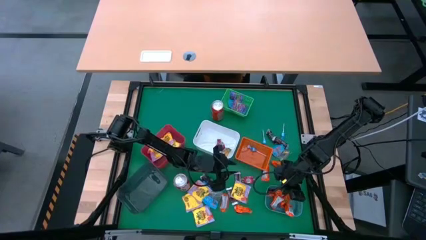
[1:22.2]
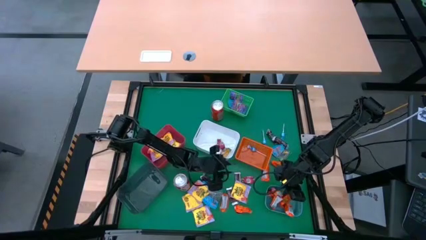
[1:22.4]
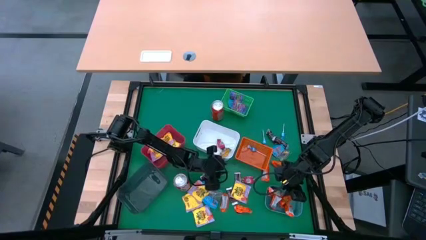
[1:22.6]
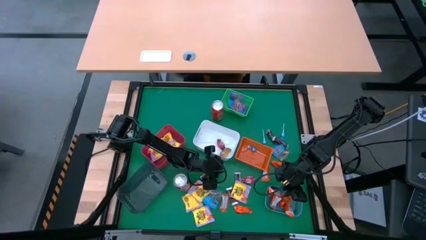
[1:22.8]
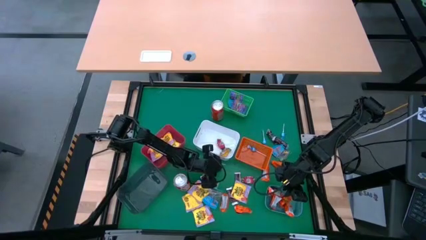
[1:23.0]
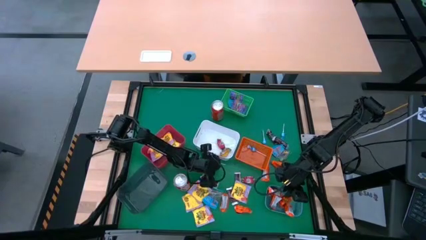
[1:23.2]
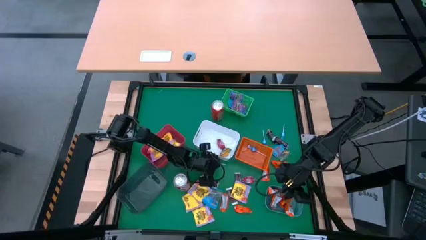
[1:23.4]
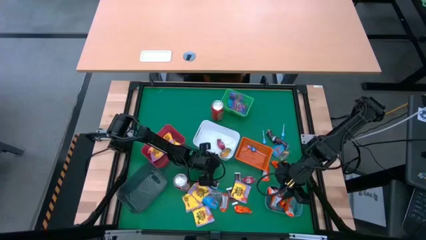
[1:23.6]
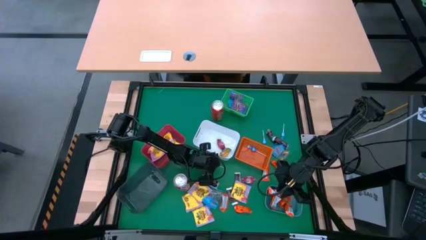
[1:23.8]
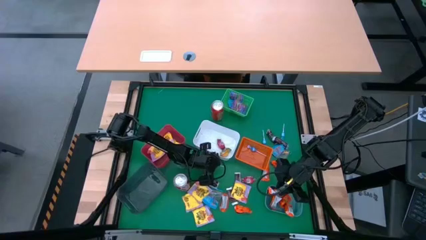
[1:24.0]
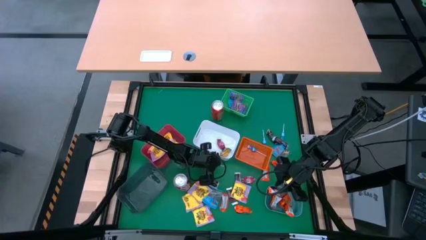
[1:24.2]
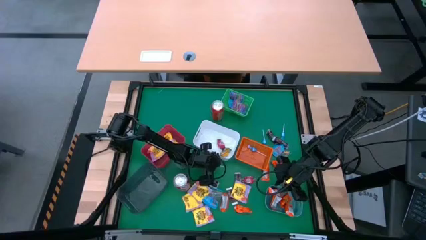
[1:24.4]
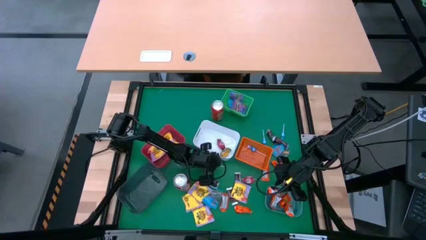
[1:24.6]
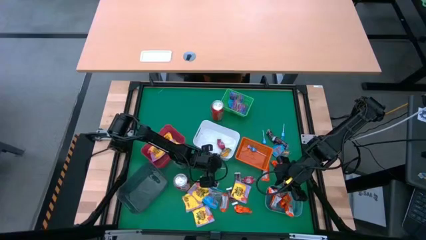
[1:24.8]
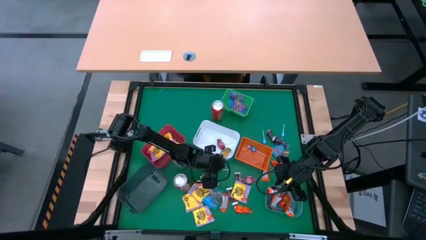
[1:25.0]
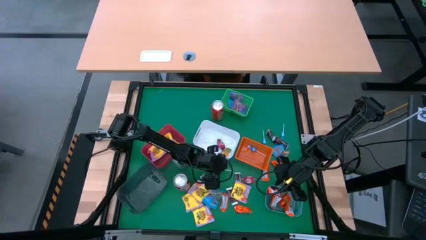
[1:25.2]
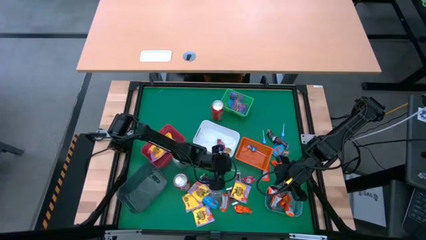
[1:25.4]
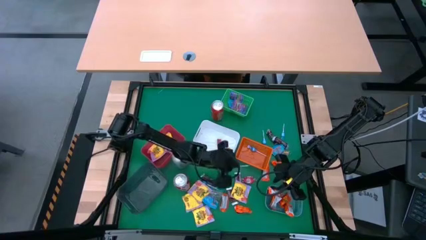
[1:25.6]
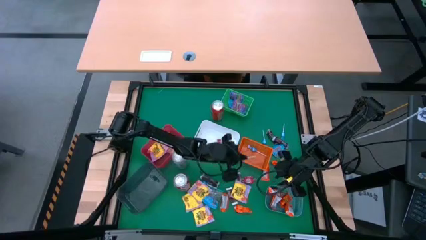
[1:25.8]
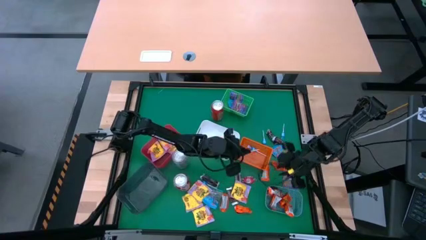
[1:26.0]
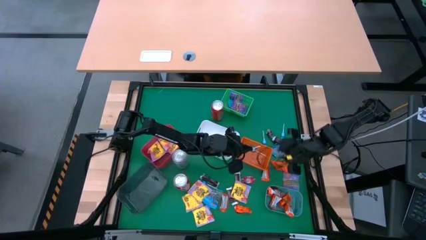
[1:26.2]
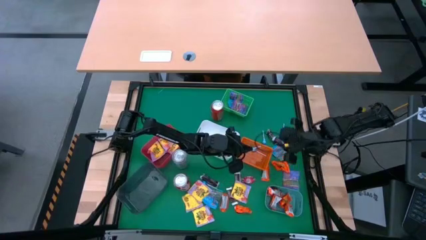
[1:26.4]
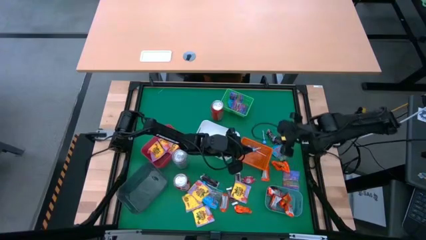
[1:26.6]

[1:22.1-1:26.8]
Task: Sort candy
Put the blue lollipop into the orange bin

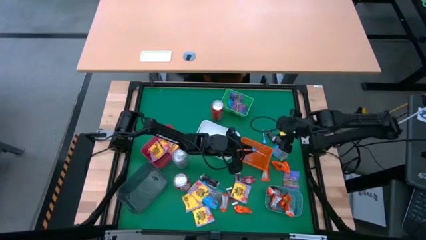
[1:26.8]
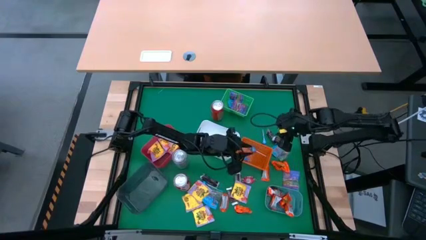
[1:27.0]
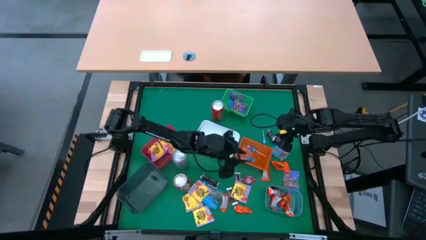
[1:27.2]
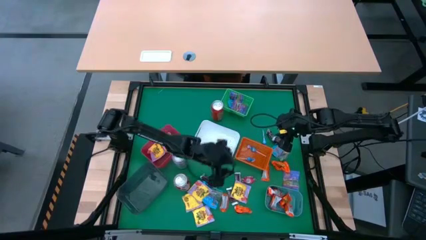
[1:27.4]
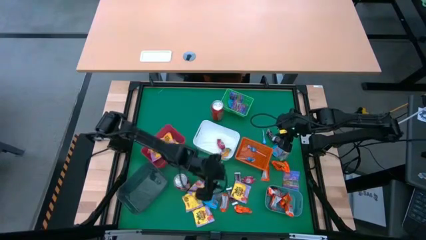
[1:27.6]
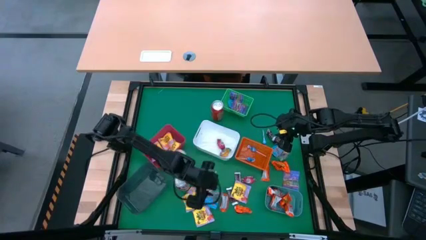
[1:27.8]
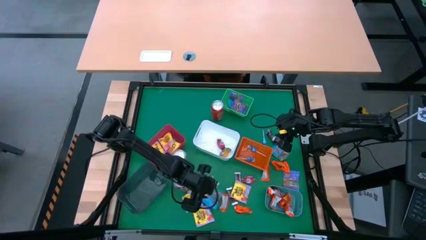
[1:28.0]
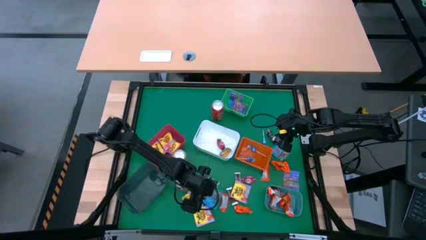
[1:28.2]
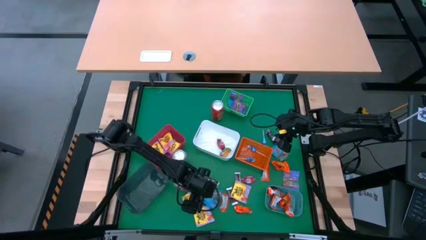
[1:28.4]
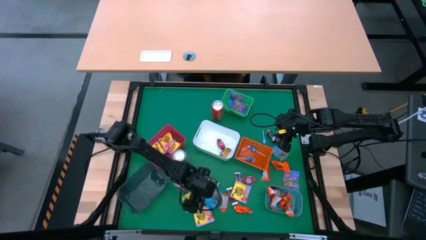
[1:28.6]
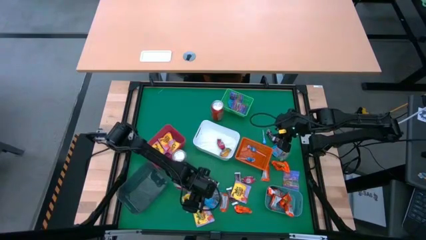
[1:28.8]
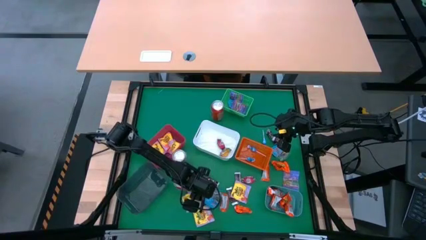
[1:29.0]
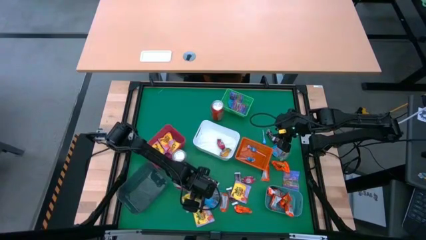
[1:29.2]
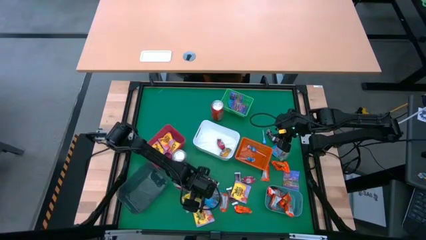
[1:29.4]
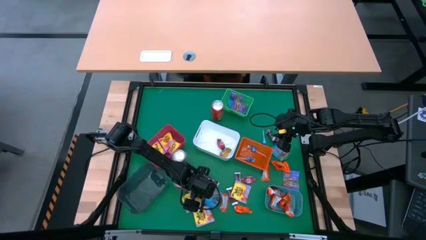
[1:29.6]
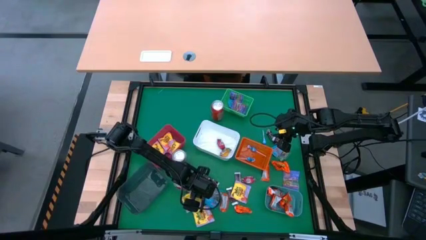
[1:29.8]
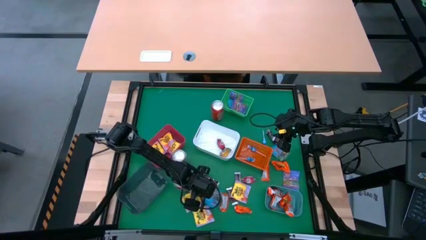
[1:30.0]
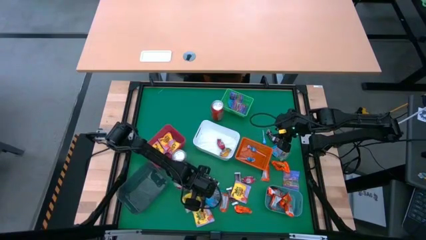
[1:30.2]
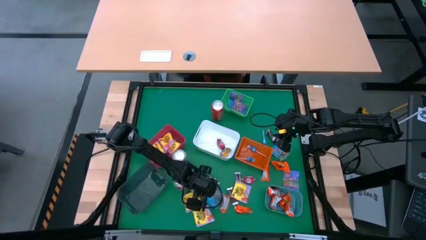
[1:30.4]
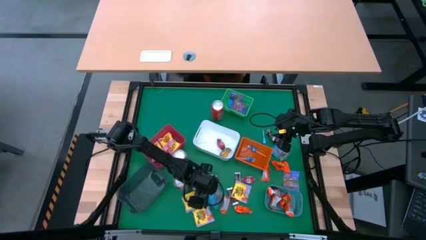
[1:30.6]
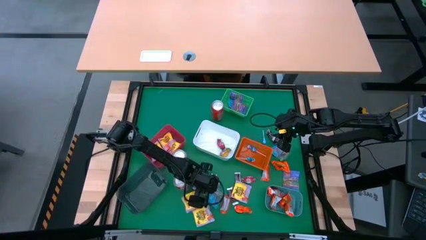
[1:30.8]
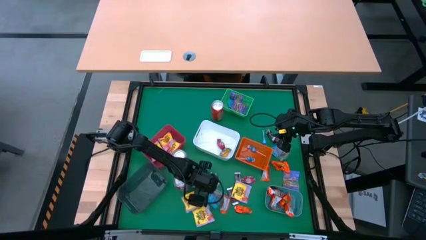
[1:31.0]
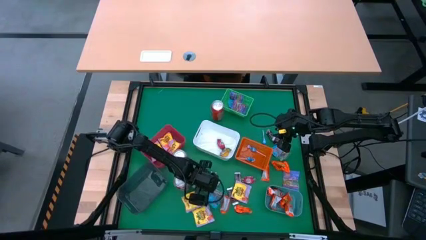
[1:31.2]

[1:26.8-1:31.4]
Put the yellow candy into the red bin

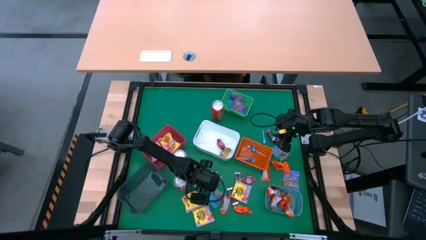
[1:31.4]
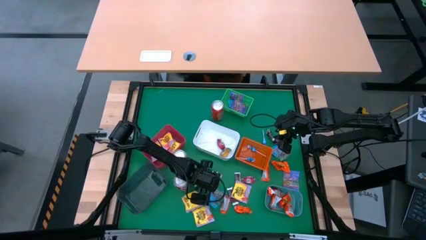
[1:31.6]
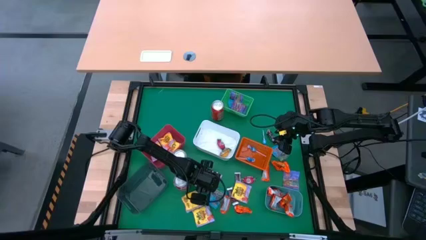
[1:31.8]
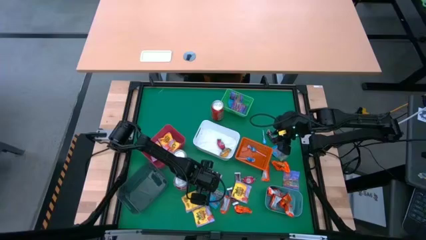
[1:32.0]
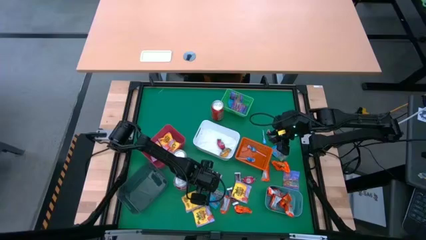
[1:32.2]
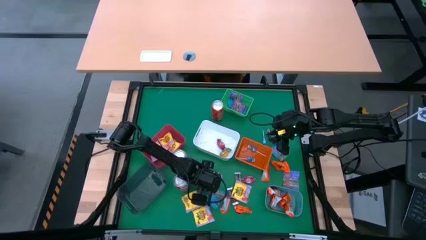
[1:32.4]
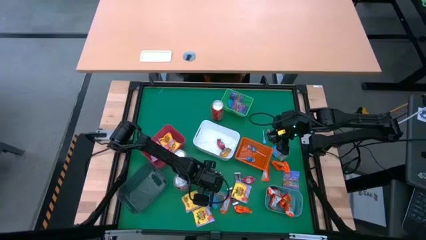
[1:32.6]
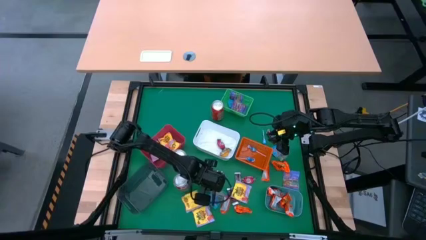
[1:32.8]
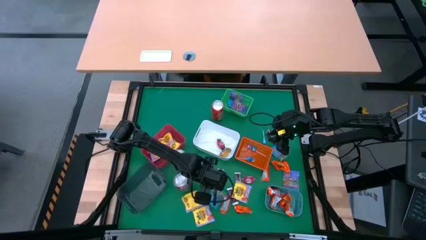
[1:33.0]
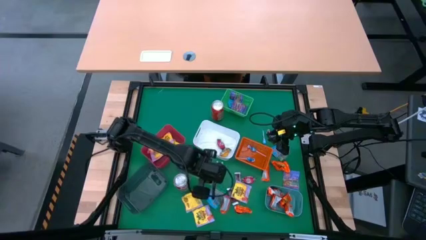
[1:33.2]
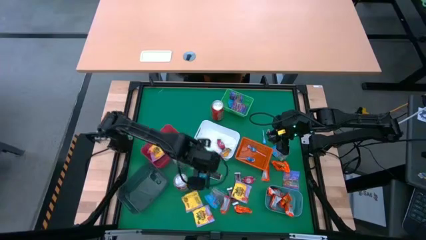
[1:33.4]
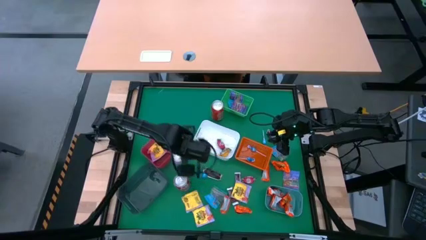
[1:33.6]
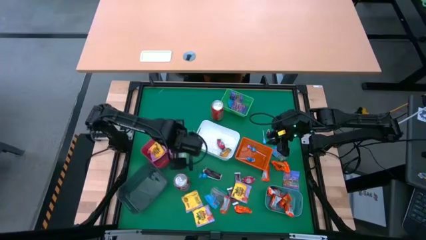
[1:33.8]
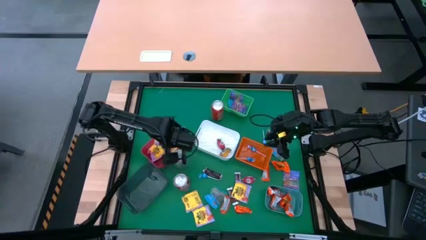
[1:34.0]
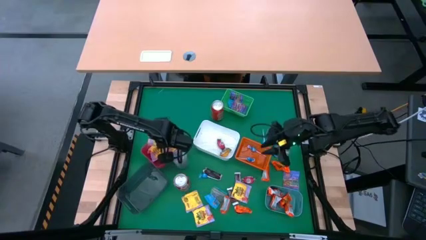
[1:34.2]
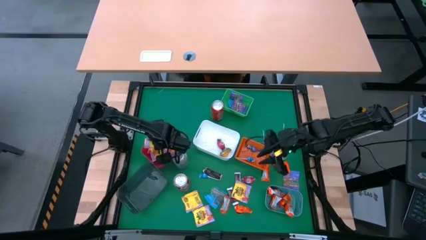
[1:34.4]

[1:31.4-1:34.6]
Put the yellow candy into the red bin

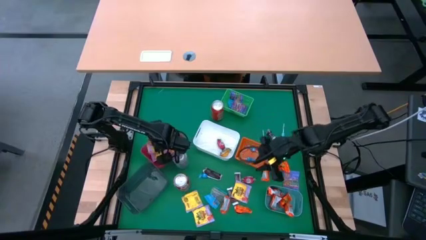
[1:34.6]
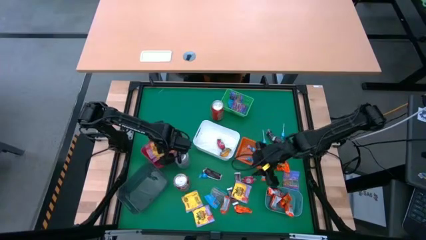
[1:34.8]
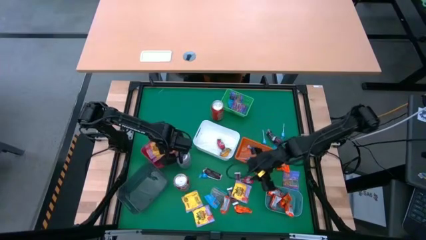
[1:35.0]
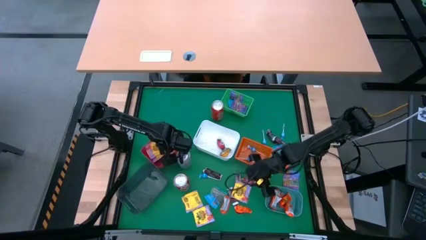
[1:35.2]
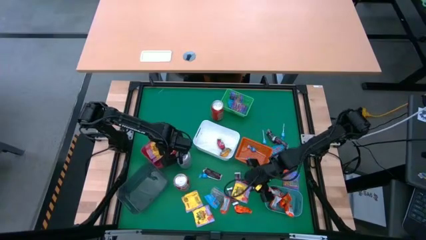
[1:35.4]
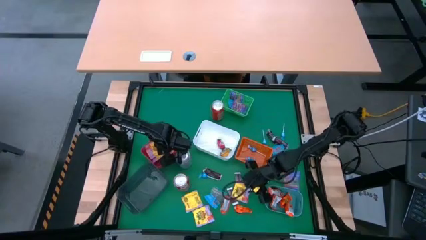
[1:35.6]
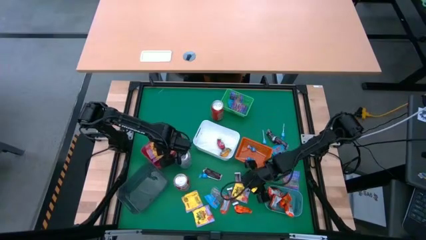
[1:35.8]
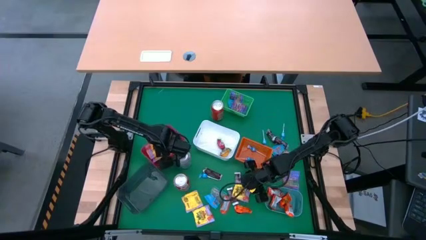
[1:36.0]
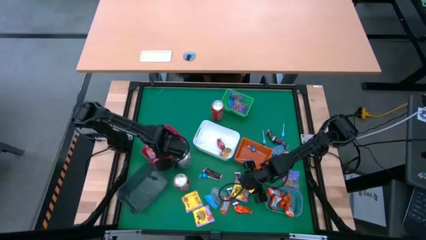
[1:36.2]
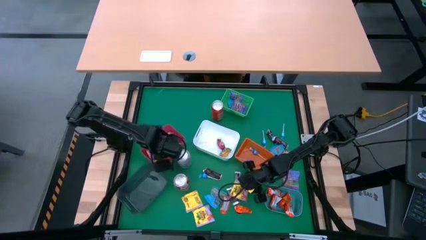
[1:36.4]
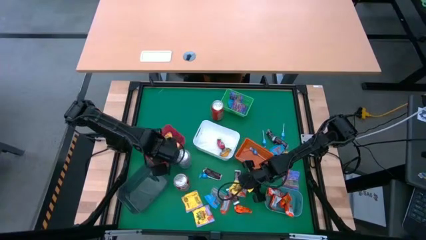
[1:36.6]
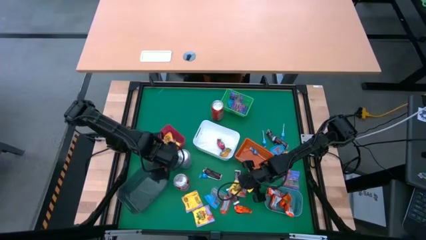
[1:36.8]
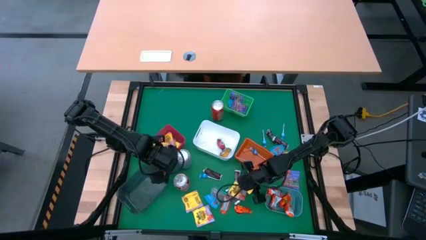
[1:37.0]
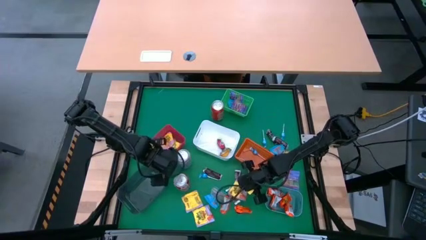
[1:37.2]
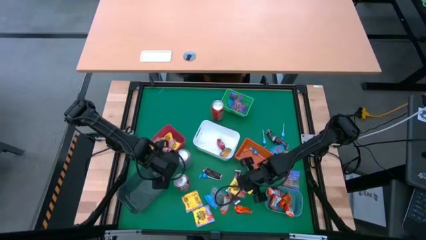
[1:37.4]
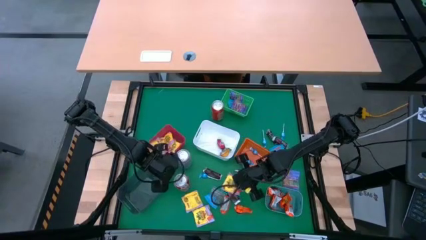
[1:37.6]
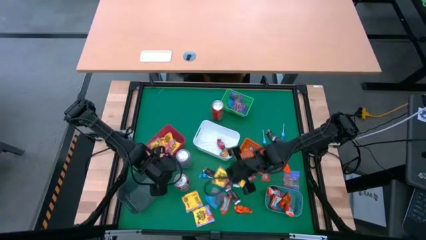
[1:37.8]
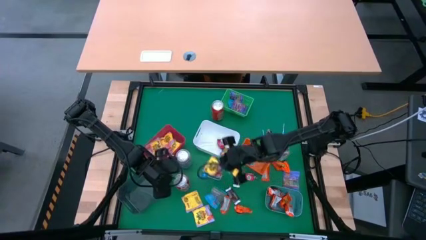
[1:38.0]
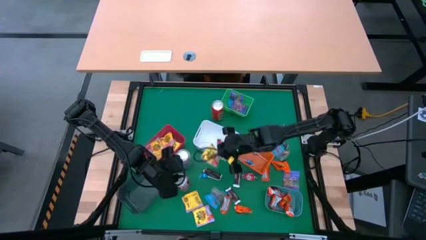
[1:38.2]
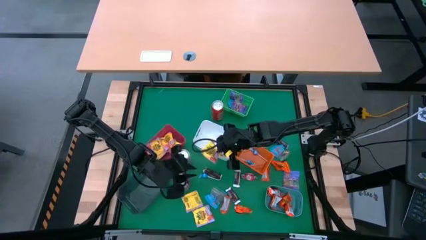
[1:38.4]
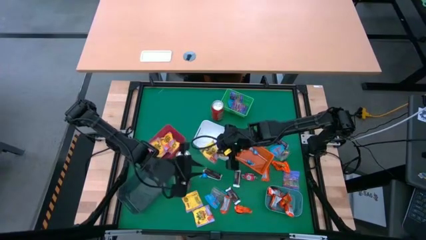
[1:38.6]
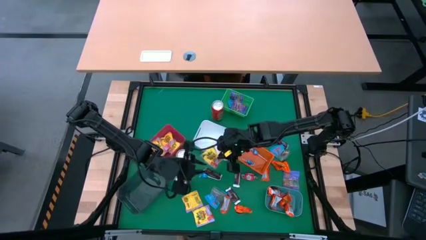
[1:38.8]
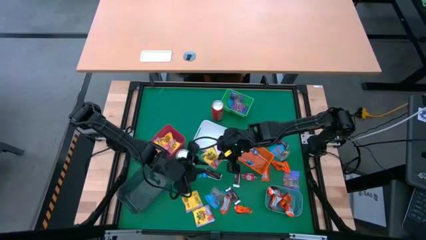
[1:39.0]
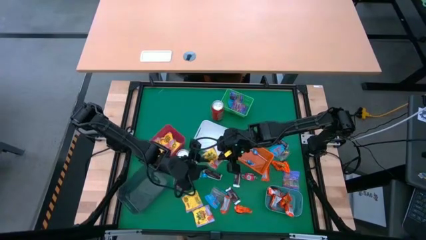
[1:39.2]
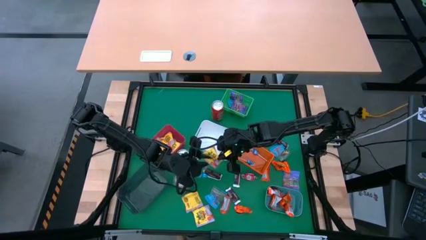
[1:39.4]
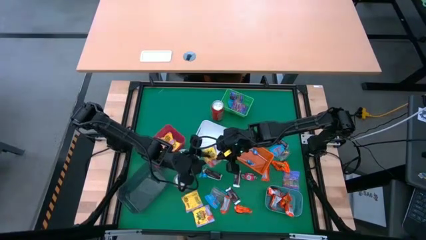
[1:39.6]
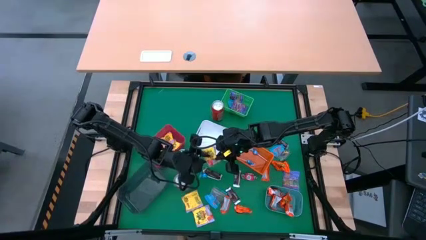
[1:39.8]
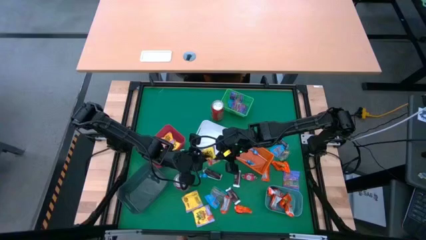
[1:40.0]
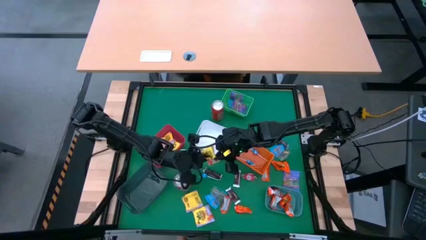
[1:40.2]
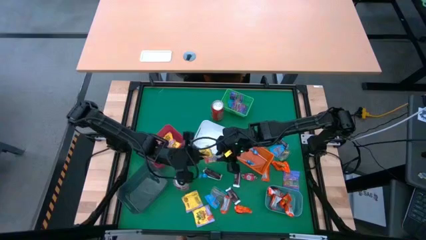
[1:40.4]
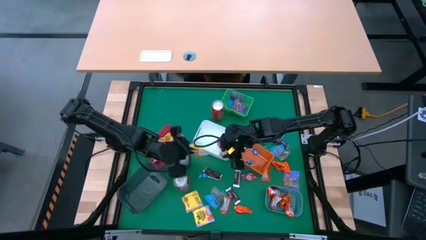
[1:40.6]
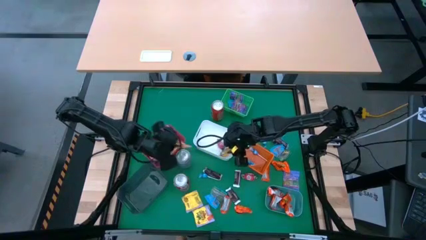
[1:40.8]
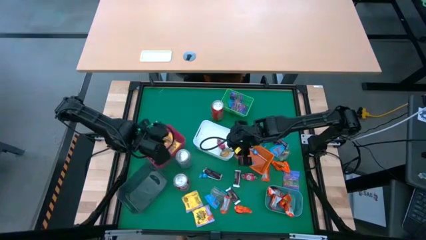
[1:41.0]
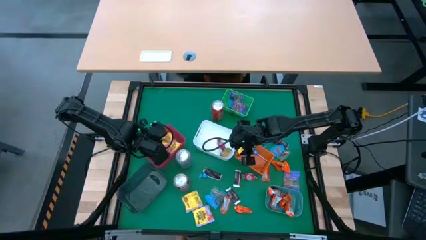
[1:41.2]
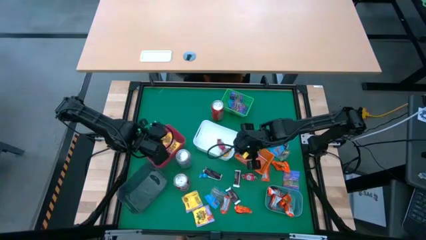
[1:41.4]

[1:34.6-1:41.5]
Put the yellow candy into the red bin
